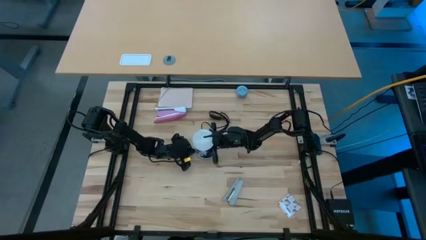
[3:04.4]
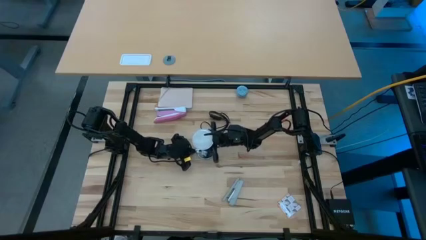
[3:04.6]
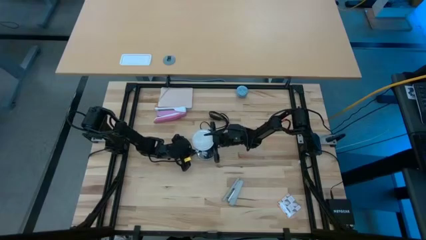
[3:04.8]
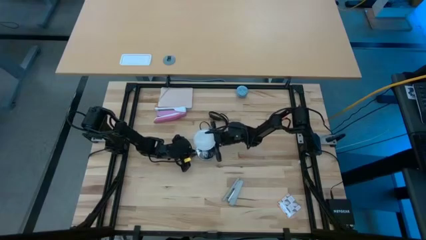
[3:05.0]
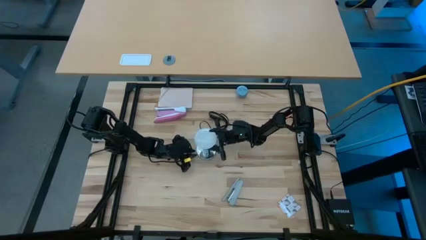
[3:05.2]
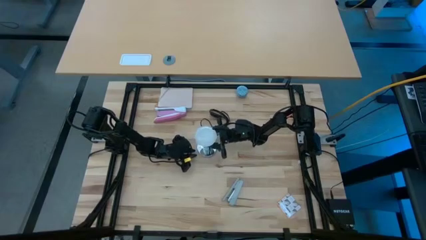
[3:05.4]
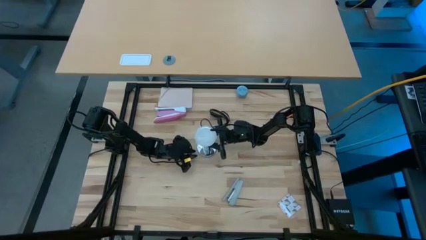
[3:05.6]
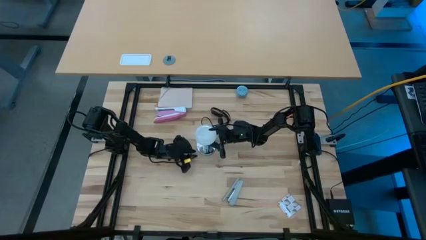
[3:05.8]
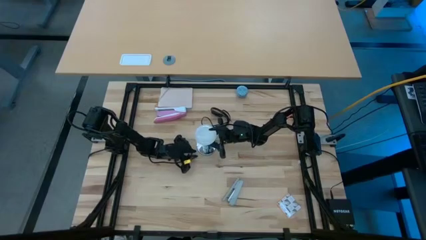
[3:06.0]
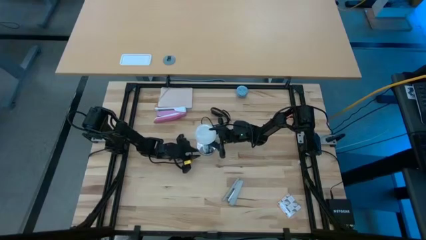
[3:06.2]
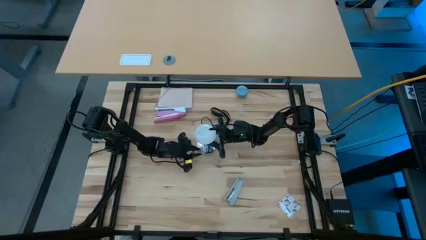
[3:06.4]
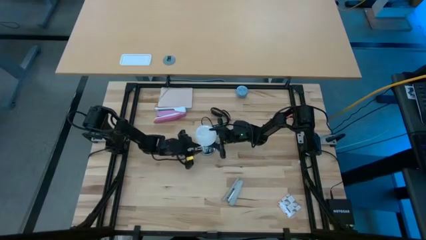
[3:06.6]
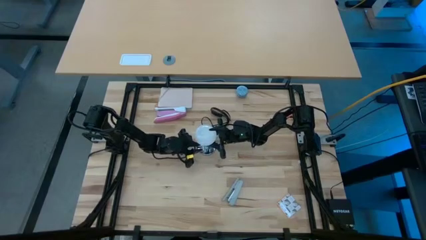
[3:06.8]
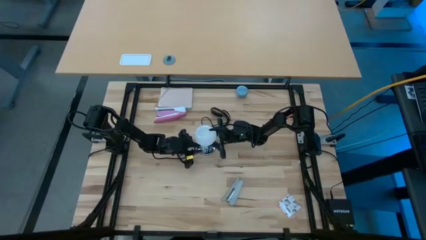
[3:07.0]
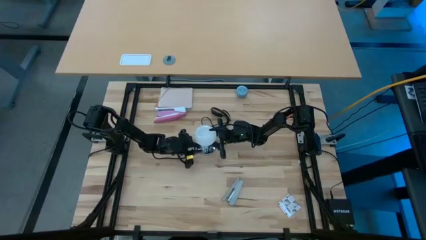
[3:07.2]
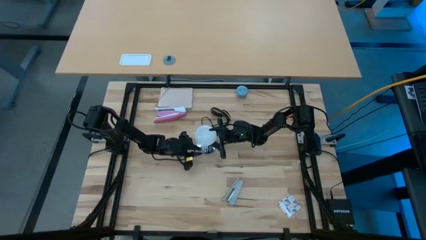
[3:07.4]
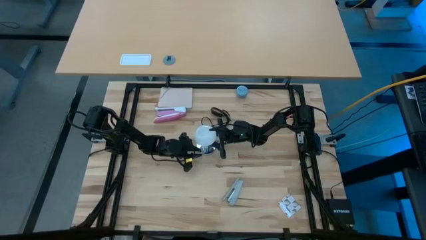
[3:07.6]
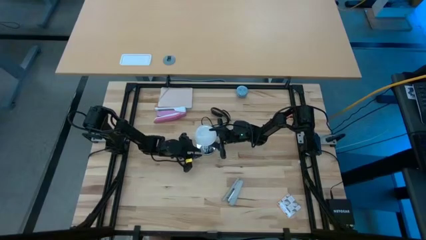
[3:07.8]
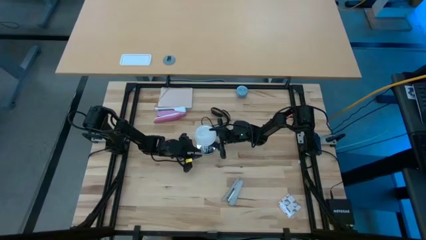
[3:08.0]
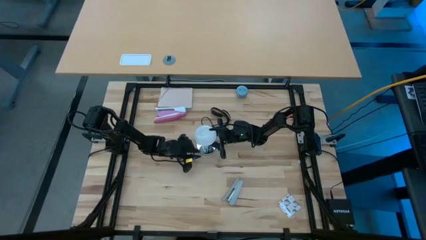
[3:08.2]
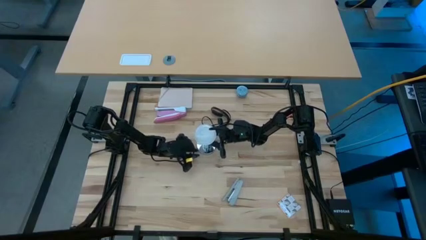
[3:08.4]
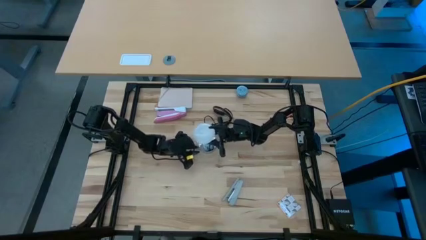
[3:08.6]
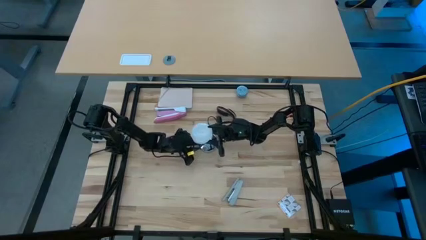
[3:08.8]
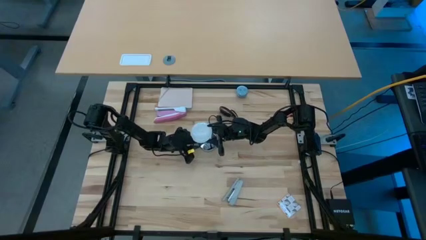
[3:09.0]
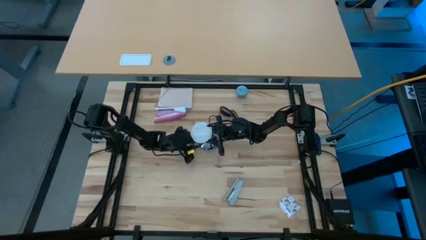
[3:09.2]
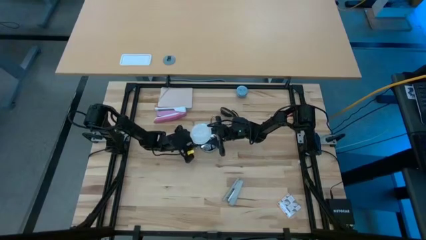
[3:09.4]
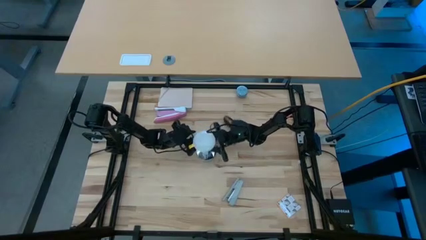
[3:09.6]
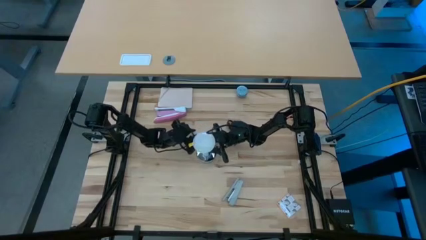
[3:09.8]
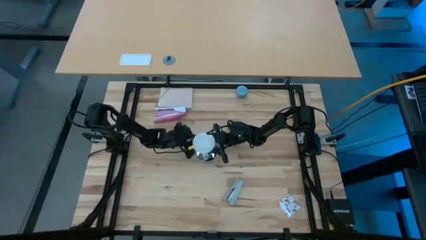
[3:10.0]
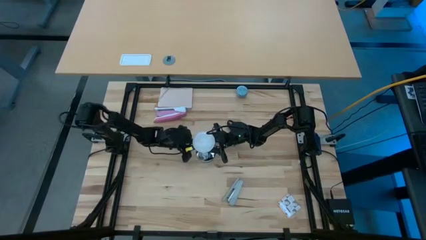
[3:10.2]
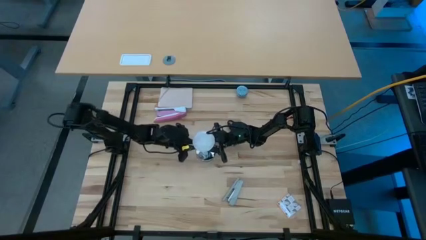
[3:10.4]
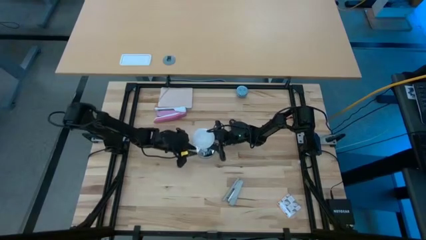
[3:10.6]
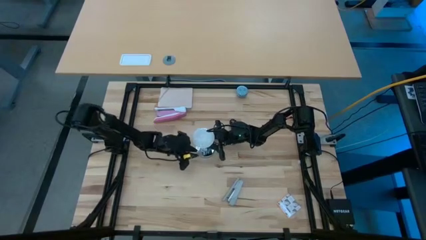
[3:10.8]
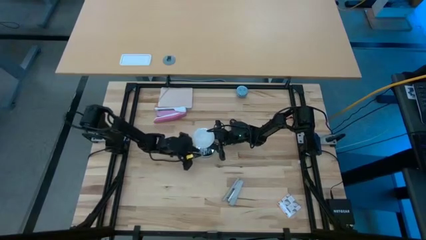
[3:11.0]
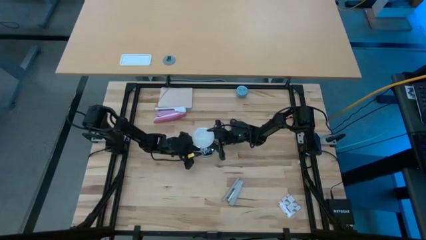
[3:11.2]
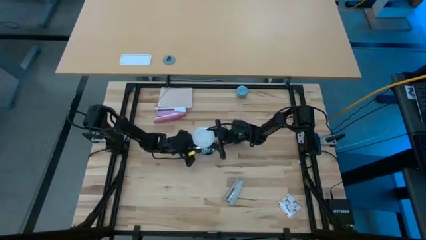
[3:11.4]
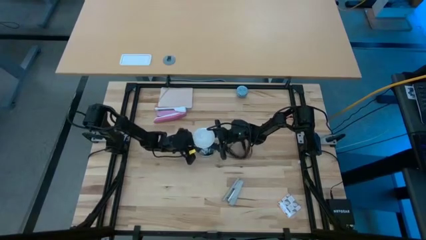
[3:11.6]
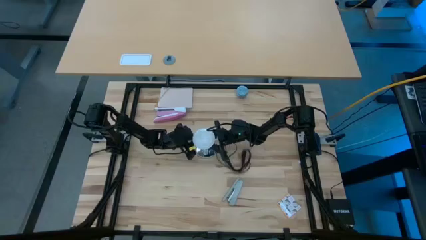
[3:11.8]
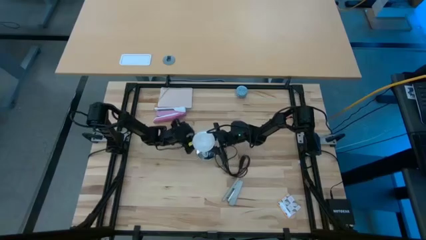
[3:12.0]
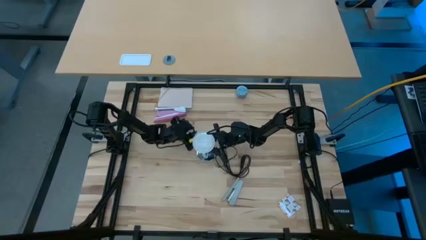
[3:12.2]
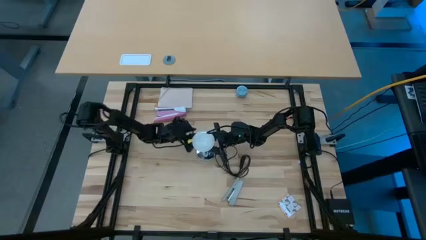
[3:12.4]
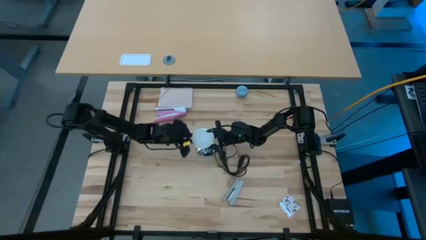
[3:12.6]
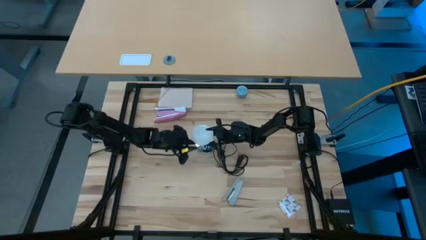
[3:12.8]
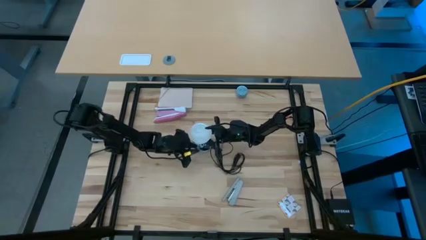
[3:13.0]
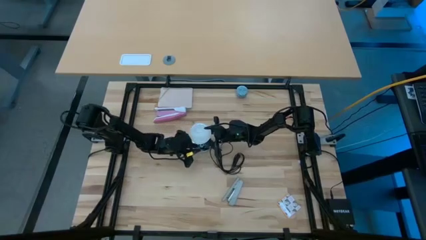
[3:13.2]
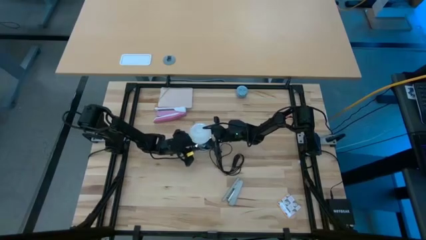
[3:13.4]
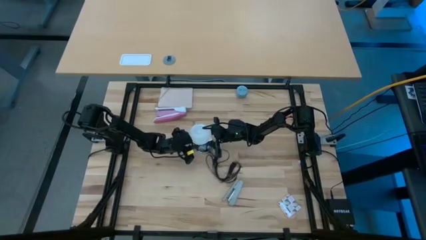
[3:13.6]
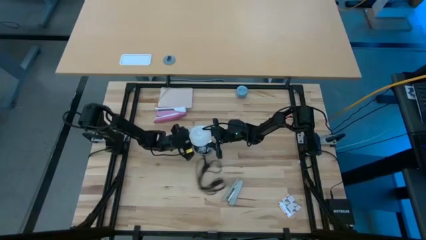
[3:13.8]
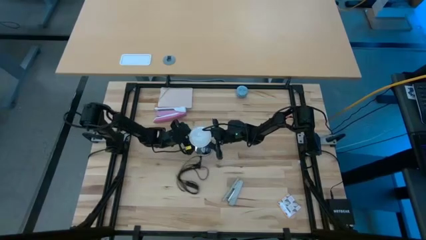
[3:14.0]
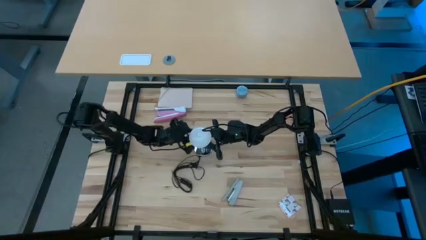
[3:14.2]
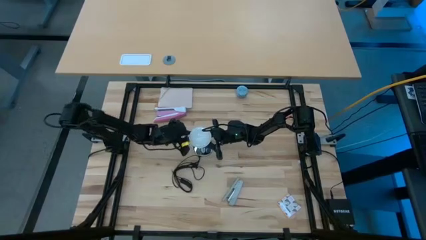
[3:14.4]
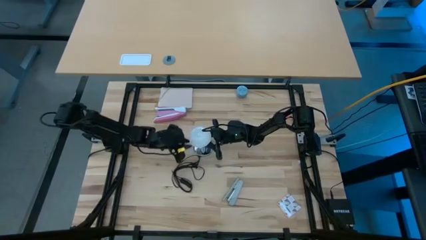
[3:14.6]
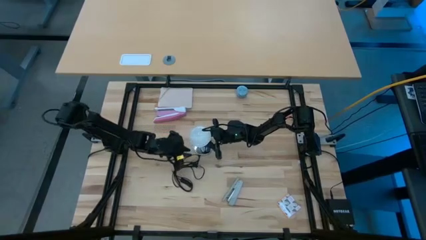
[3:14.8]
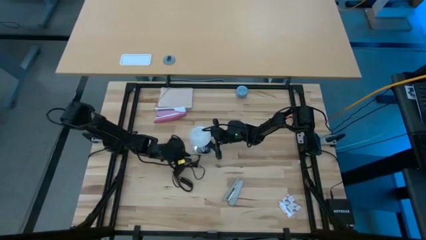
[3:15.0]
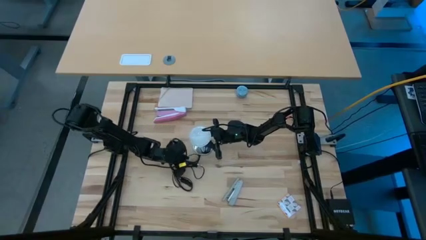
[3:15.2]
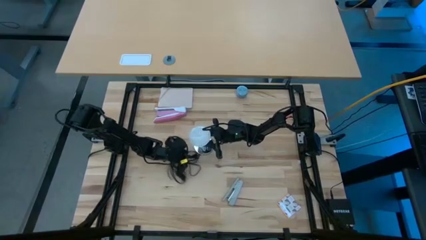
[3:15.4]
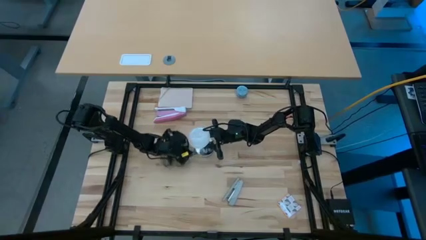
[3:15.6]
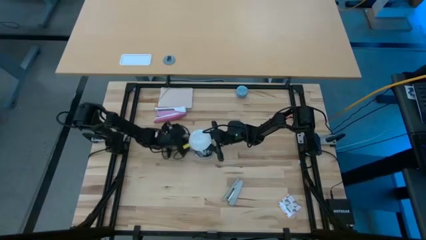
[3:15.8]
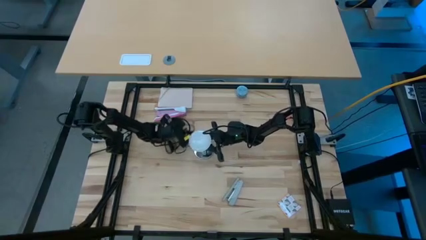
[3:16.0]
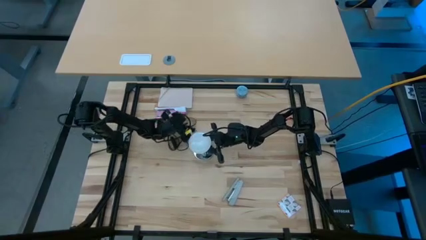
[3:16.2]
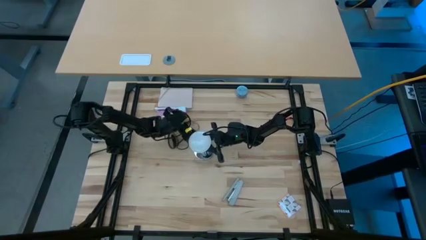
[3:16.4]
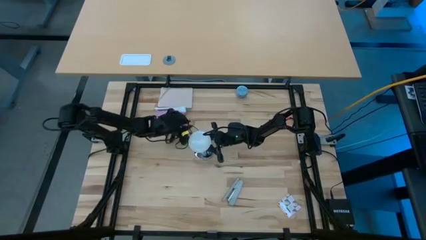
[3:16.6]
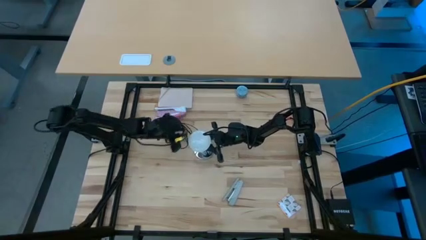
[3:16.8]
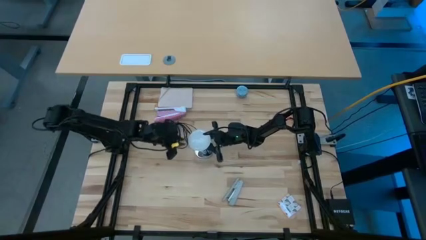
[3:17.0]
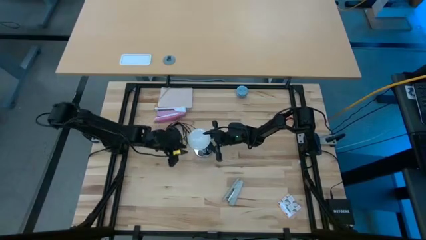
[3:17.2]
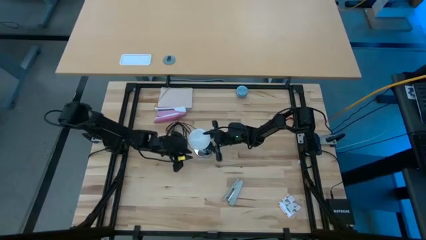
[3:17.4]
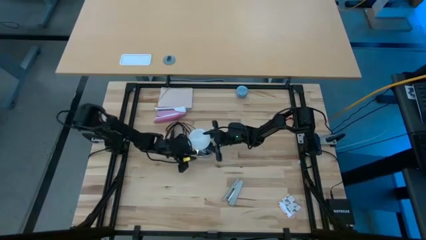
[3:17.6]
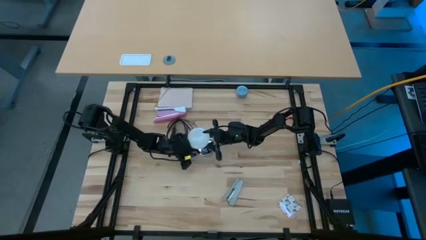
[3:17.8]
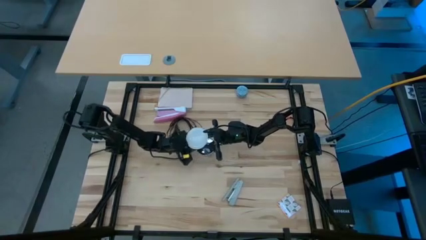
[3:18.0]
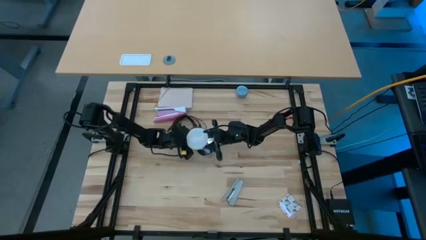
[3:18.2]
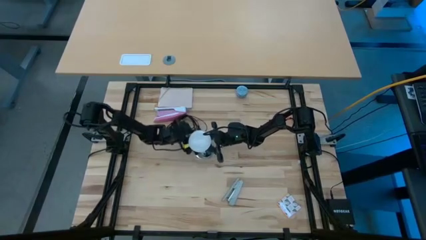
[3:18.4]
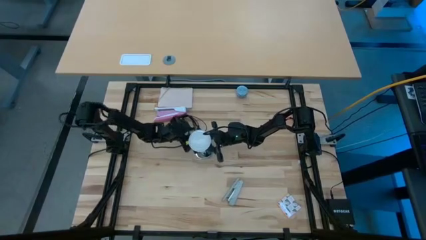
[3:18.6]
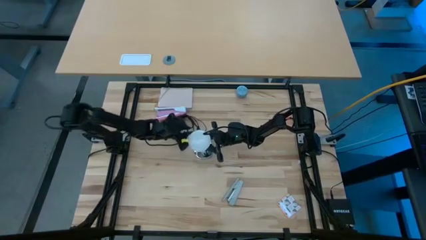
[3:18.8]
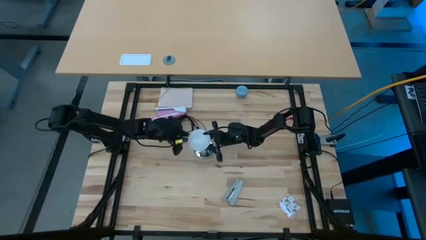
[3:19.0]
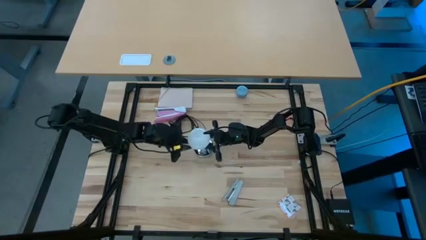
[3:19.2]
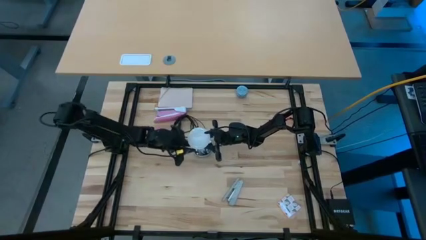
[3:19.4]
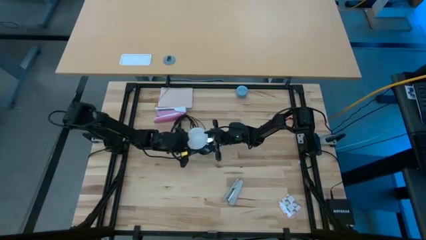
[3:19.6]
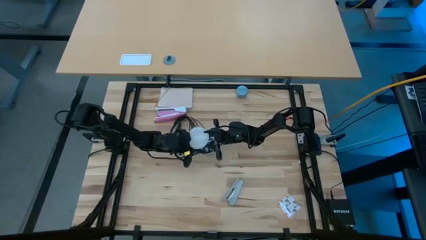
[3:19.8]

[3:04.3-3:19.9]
Task: Screw lightbulb
Remove the lightbulb from the lamp
